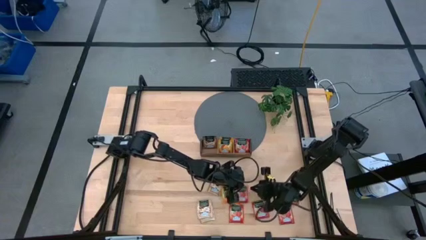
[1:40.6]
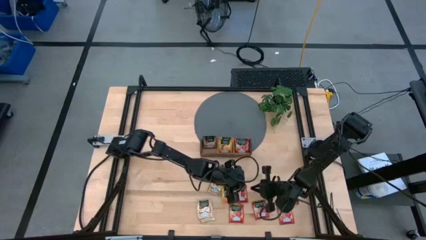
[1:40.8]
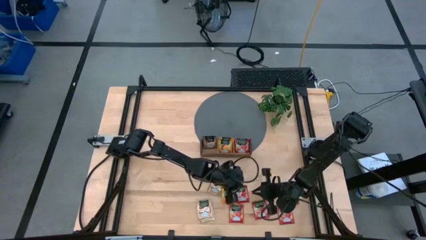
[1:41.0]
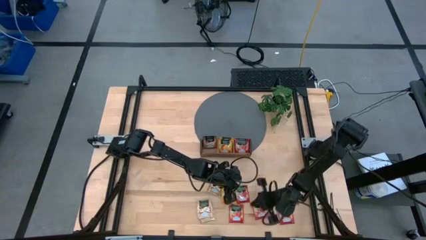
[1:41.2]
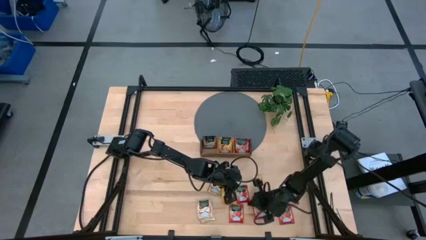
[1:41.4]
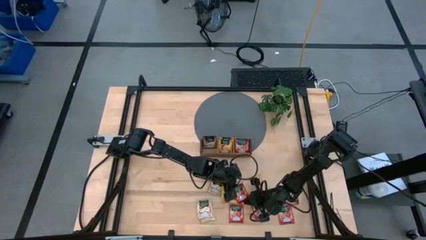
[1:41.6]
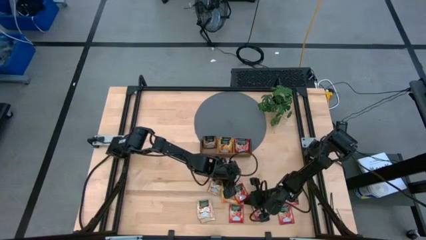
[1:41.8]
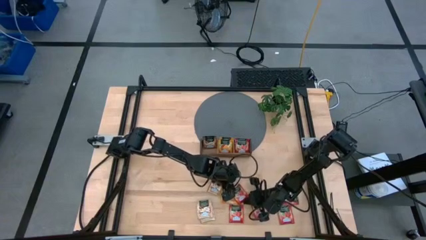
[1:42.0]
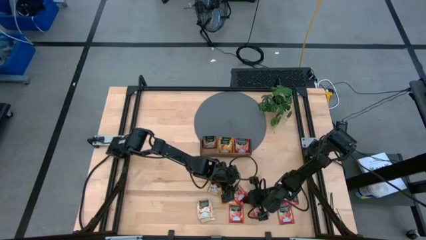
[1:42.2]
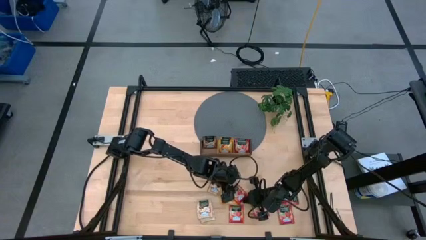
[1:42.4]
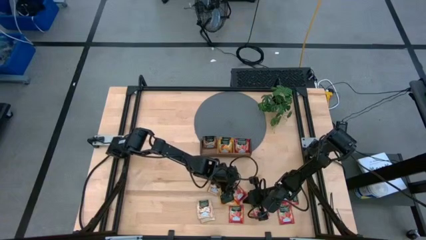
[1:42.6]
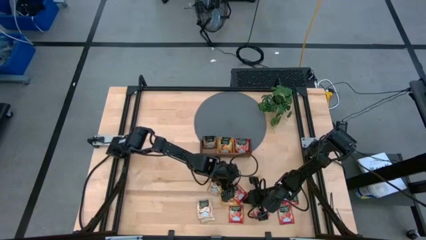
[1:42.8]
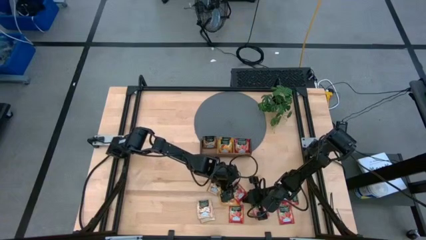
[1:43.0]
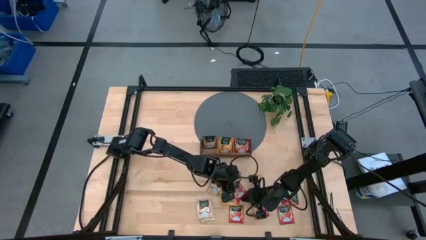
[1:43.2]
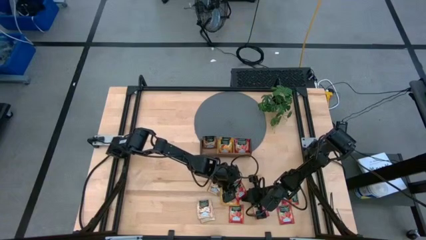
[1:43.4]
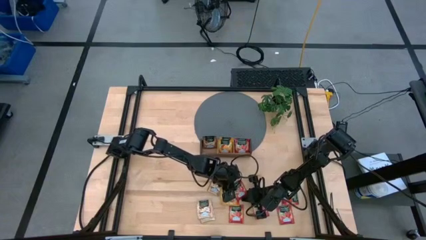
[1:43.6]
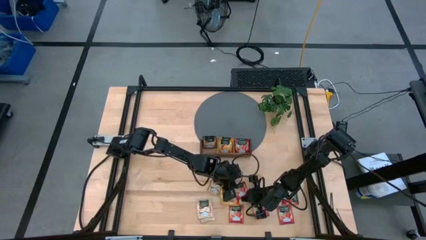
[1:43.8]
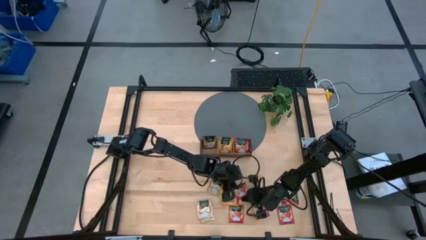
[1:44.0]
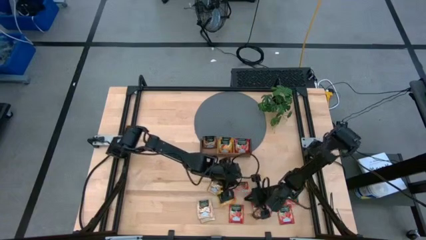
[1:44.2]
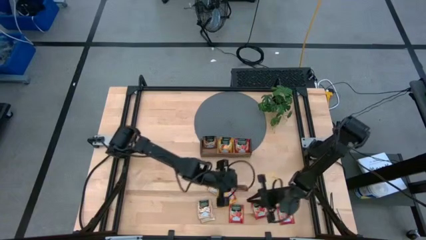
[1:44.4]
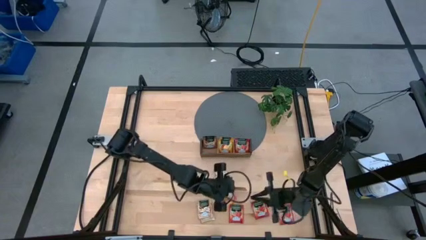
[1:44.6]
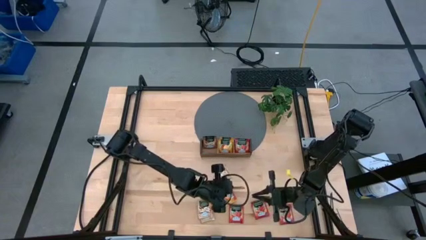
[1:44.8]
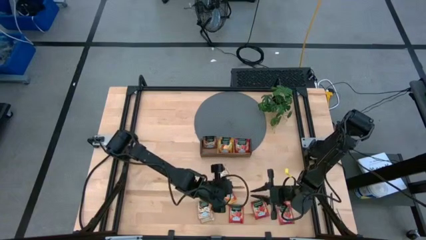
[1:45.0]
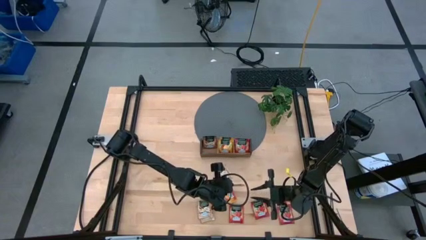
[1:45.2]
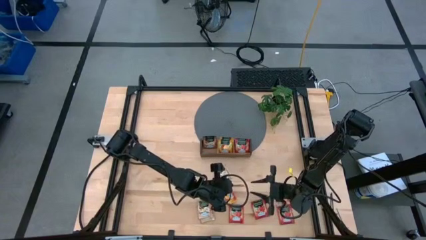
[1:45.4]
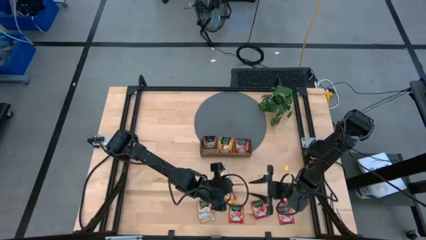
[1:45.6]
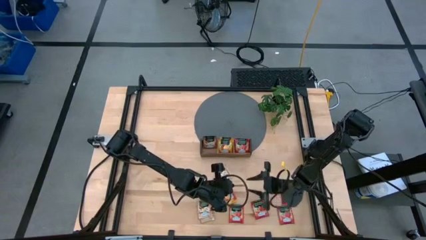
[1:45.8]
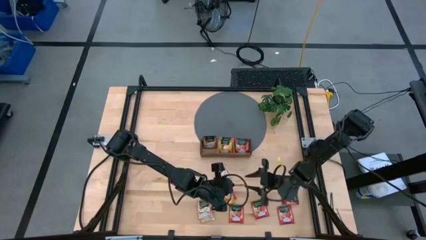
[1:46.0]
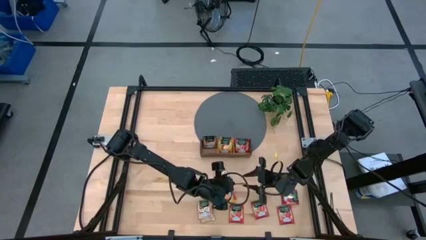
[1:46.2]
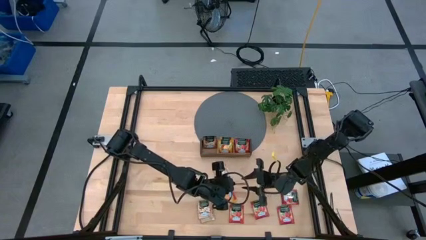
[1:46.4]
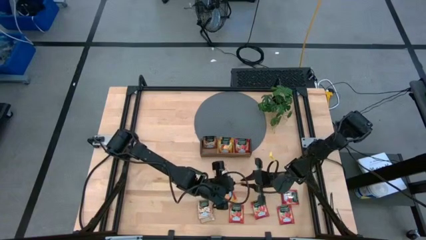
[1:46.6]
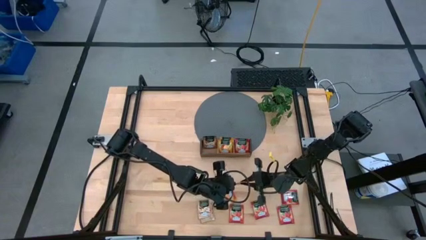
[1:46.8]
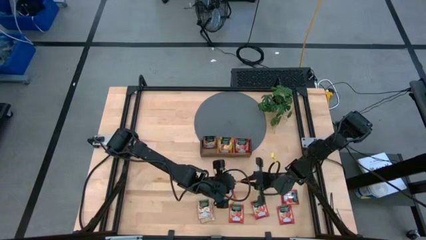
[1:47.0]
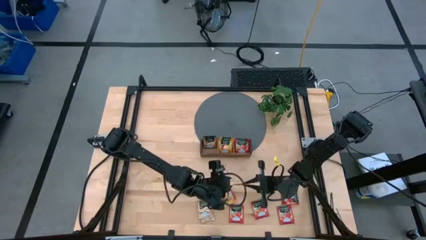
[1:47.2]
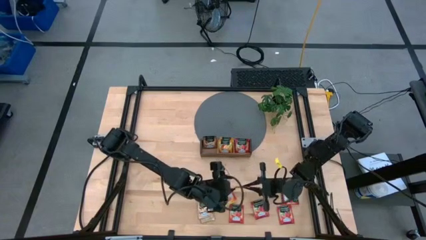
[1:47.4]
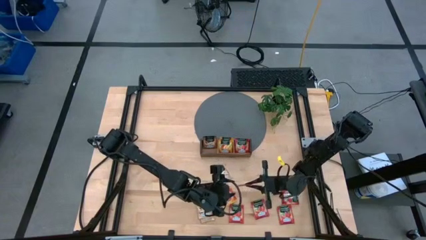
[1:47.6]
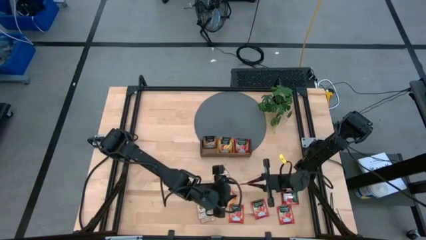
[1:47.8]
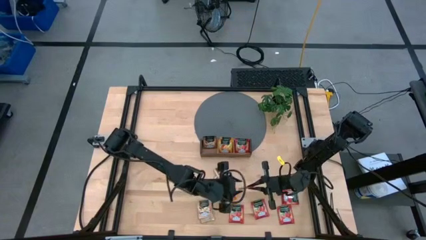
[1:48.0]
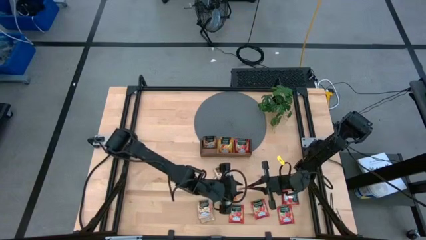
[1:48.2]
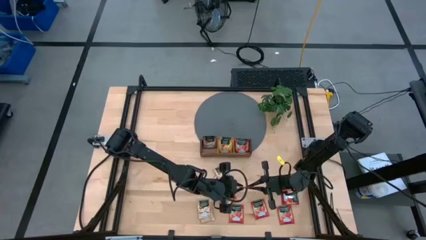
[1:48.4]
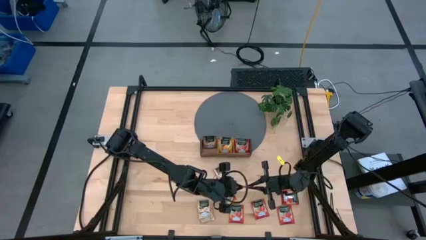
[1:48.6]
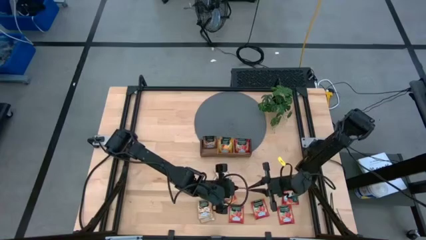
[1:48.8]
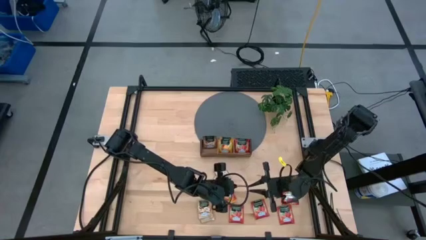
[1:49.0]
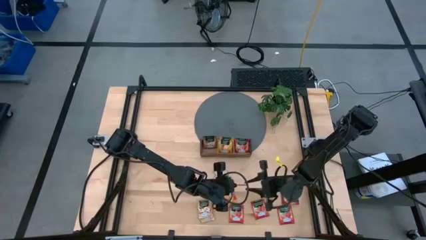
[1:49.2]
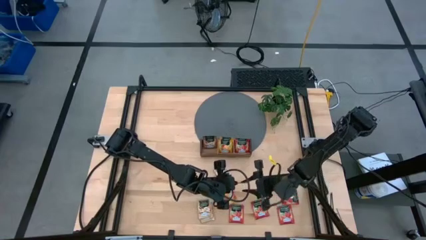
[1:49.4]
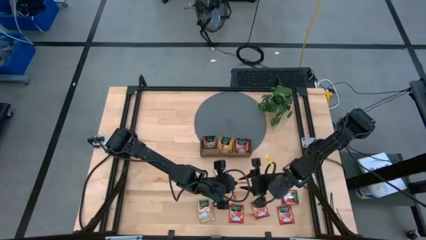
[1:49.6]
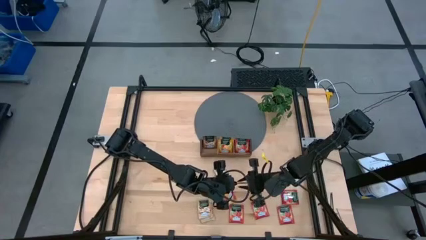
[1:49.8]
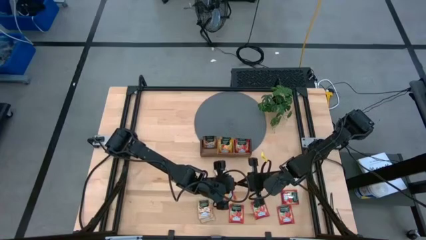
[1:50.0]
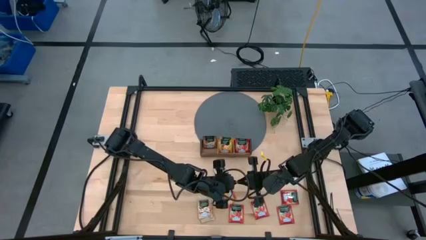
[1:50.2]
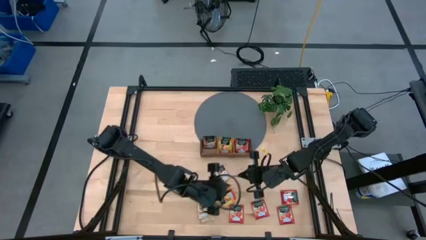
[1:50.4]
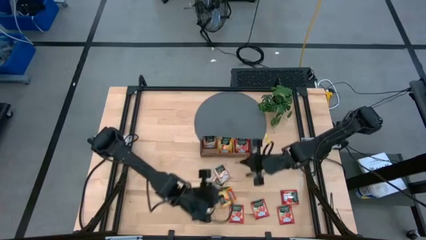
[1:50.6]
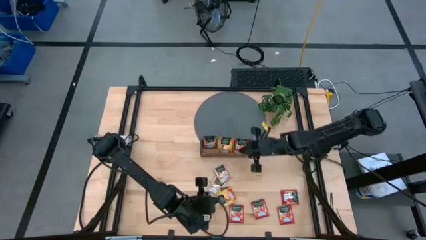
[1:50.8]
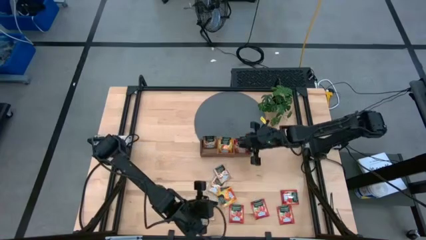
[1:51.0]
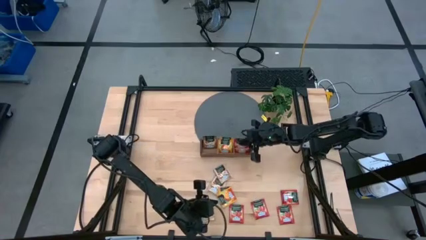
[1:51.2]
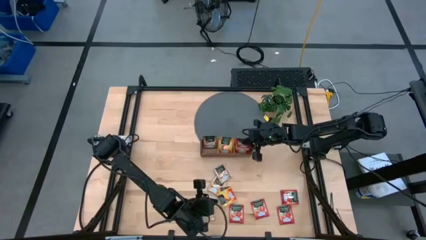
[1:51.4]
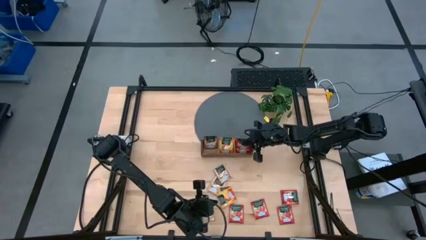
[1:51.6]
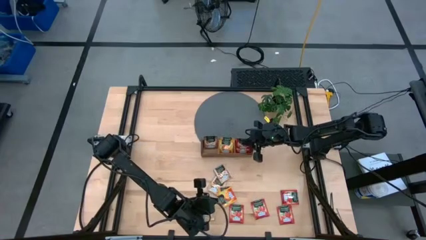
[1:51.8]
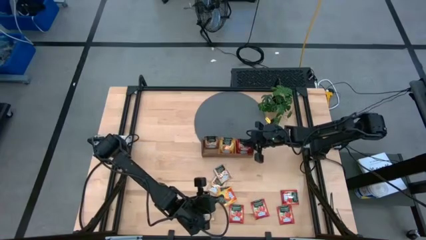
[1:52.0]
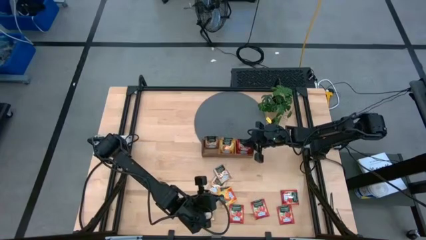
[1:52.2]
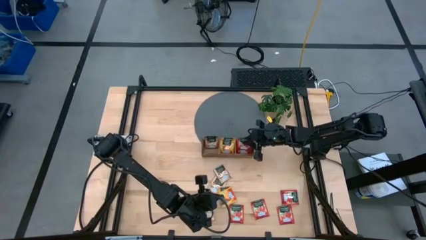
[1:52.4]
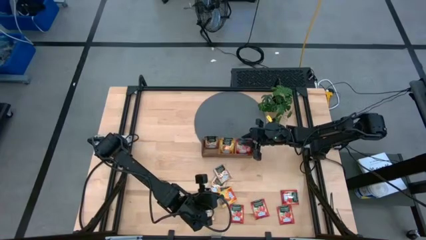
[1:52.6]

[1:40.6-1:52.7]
Task: Pick & Place Tea
Put the red tea bag into the right wooden organizer
